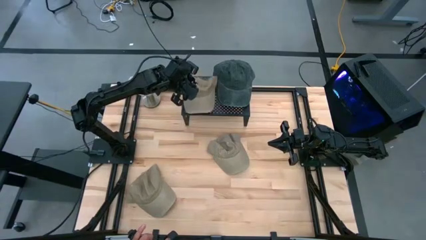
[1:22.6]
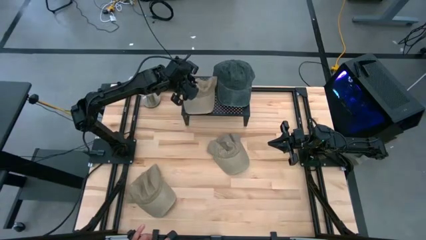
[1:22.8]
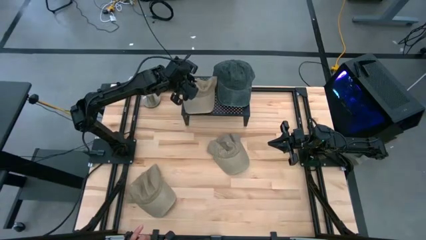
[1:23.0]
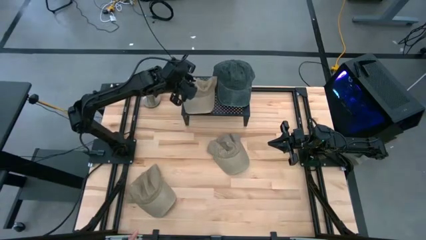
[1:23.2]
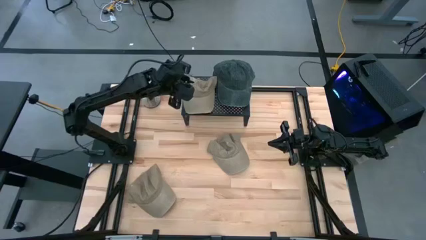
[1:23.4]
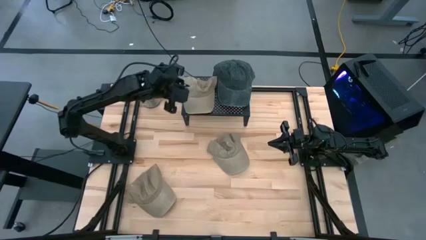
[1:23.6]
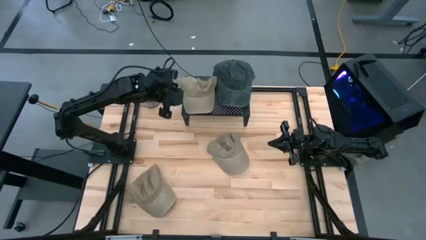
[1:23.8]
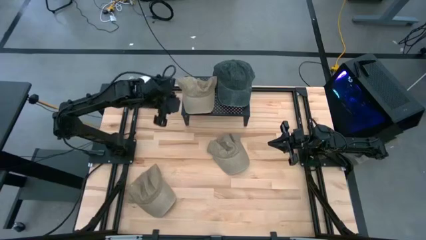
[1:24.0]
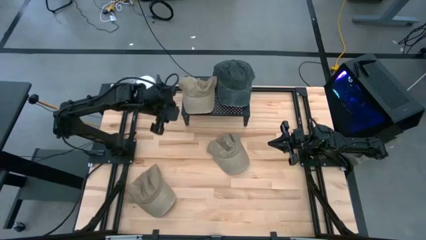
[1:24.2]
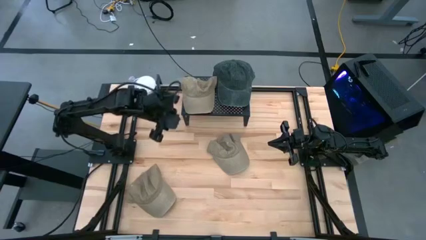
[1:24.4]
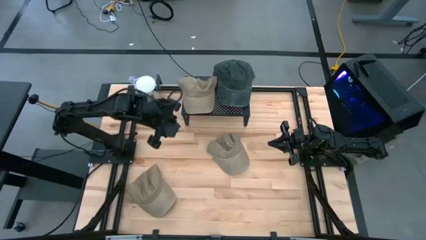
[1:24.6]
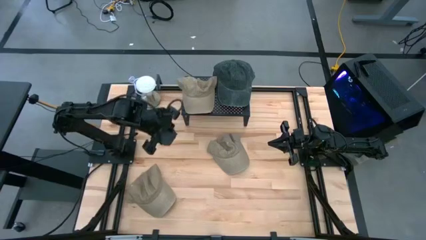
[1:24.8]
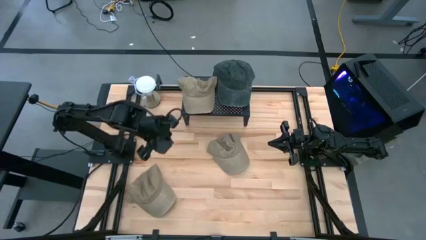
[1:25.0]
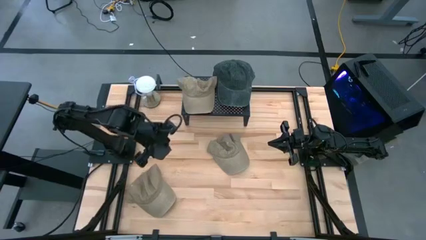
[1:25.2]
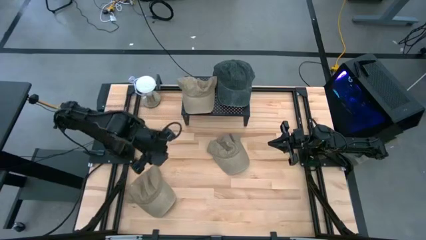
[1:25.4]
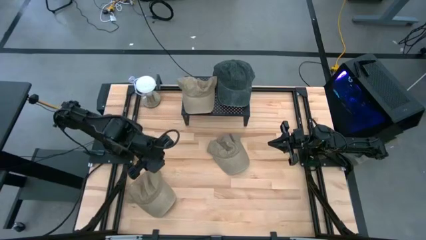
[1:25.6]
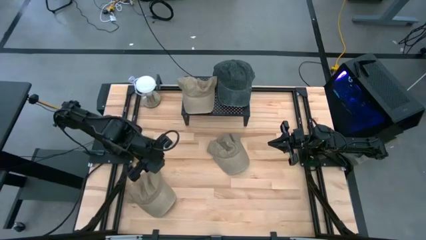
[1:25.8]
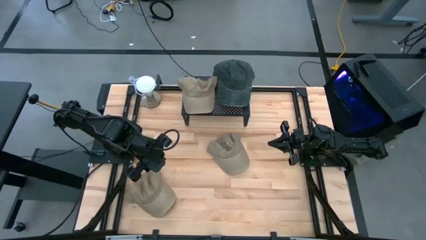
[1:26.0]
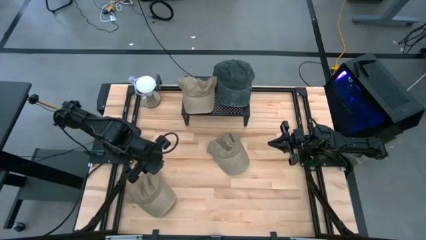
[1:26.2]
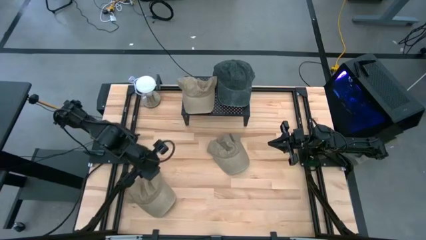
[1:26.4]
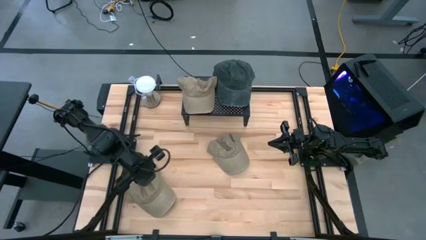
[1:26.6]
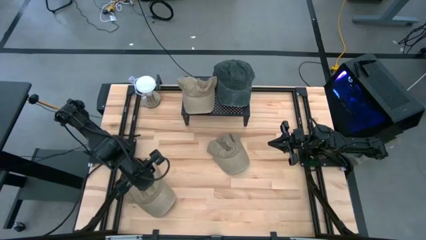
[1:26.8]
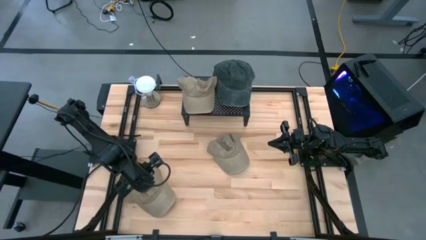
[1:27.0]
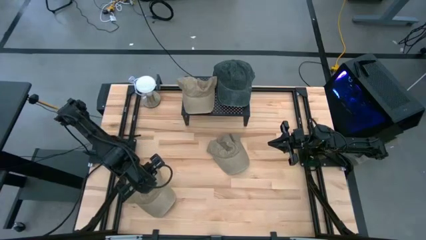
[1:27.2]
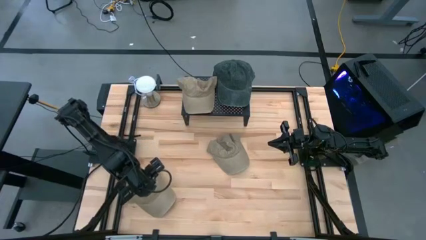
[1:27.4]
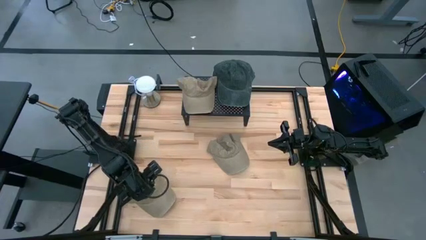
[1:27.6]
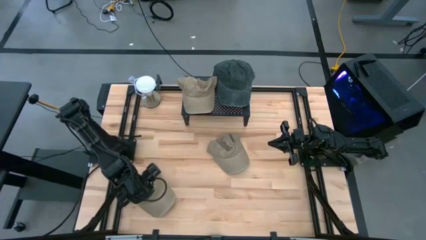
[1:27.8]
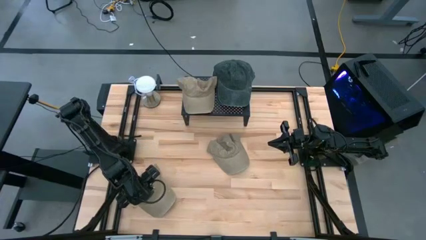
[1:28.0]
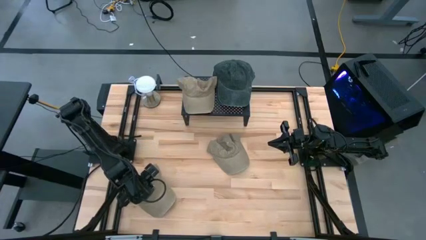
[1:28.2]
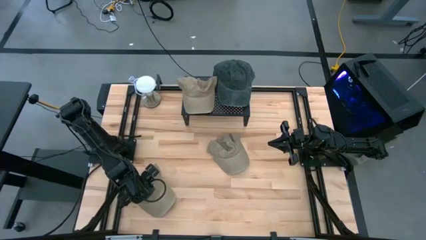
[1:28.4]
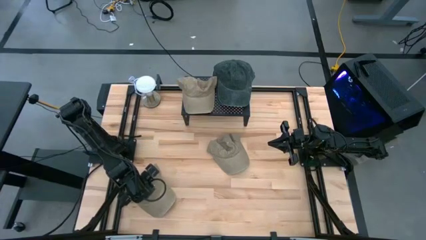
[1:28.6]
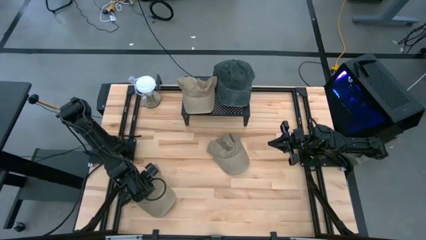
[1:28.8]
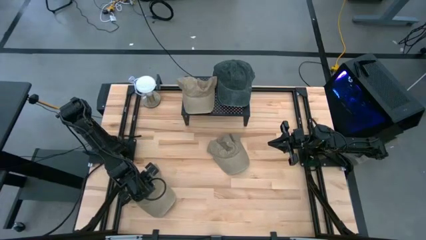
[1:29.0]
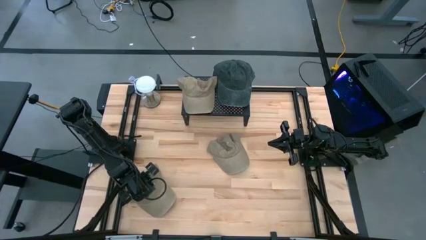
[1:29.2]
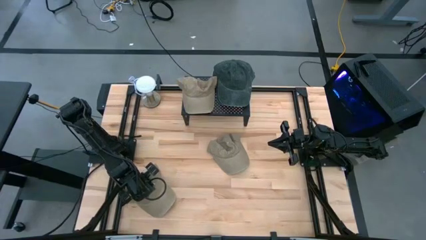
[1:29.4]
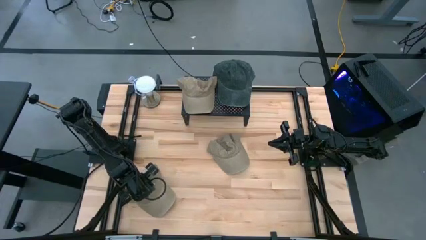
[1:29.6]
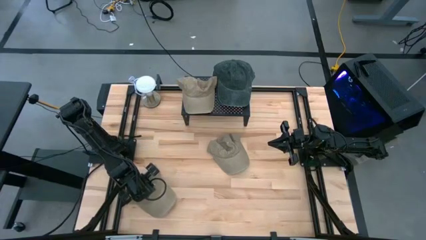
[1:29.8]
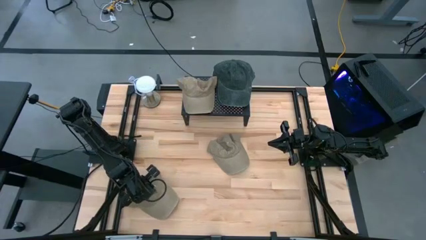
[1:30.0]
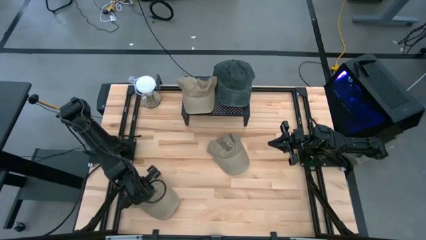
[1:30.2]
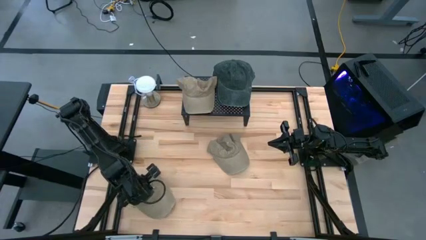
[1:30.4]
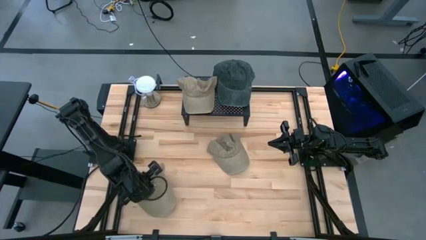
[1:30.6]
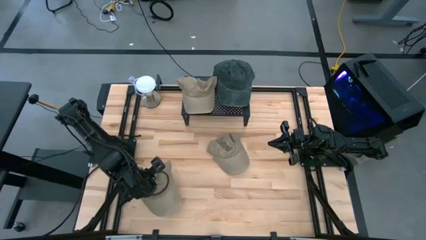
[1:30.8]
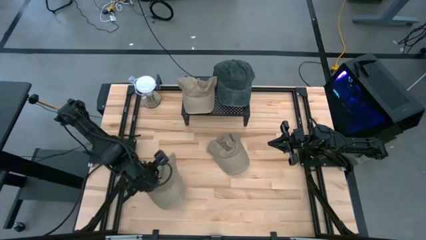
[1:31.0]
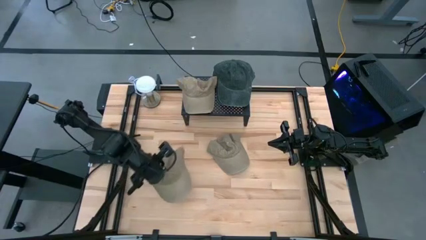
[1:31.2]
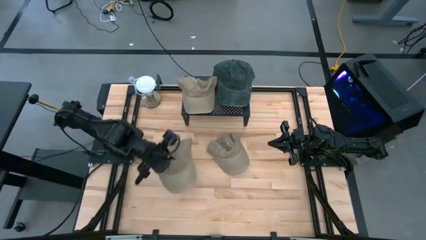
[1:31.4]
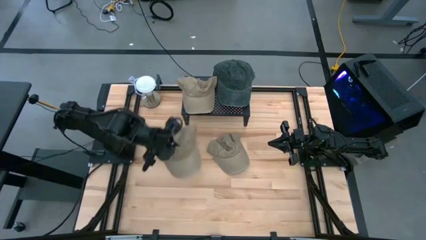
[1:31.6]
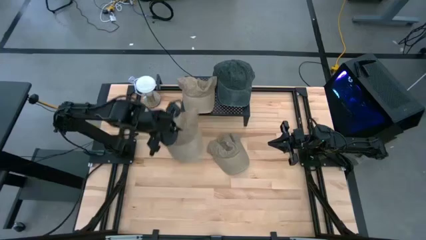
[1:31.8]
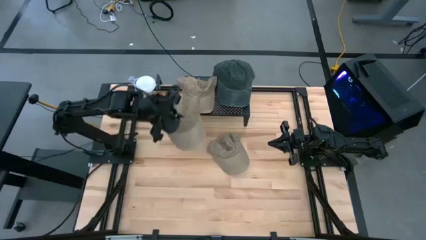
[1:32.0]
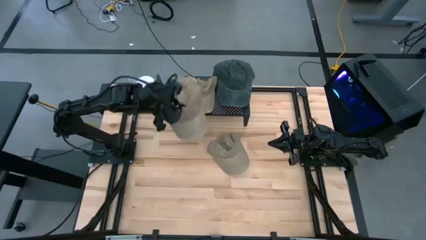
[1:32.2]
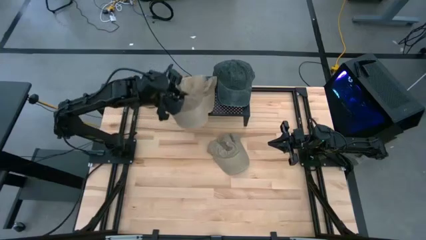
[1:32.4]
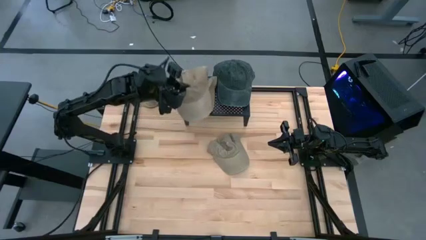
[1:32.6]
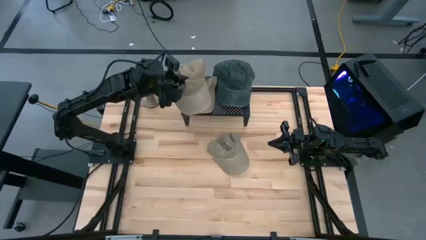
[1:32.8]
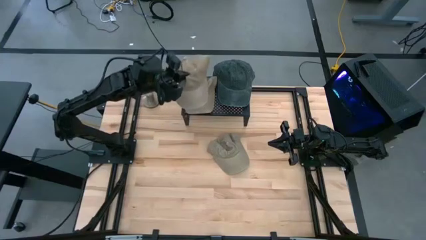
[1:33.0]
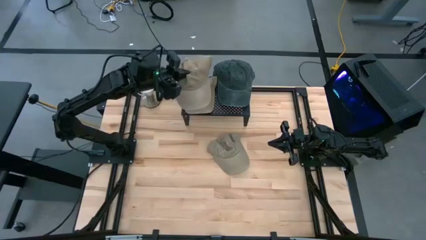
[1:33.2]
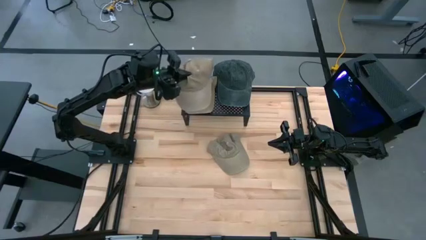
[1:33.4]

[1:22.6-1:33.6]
Task: Pick & Place hat
Stack the left brown cap on the other brown cap on the shelf

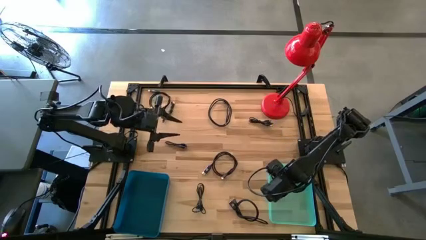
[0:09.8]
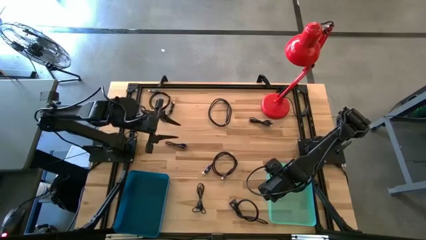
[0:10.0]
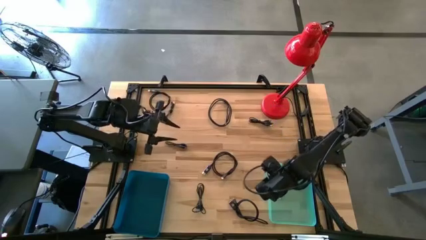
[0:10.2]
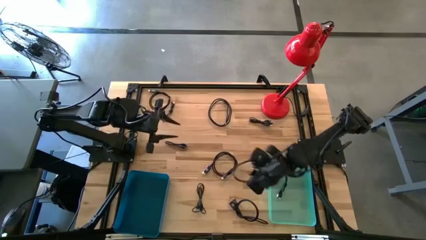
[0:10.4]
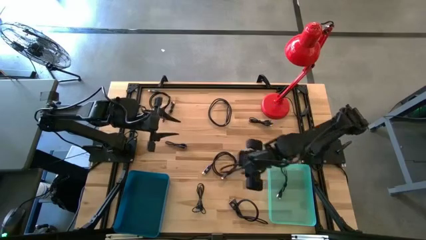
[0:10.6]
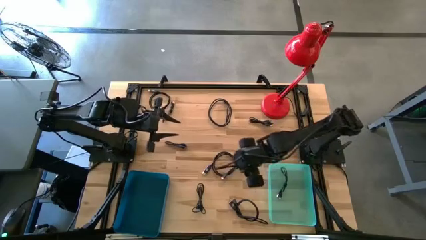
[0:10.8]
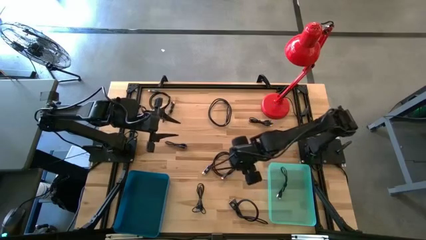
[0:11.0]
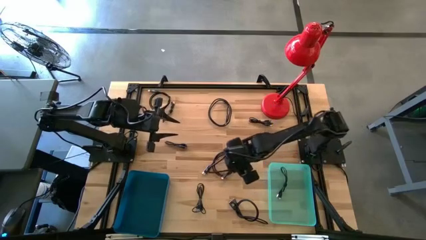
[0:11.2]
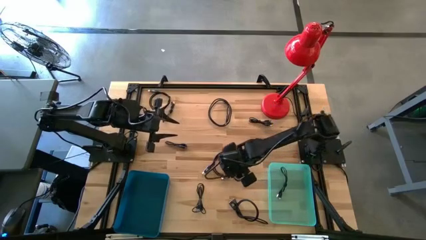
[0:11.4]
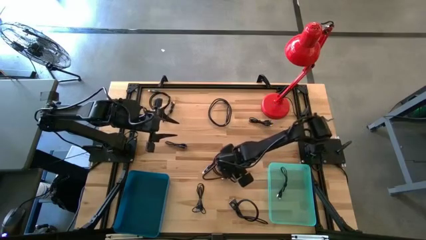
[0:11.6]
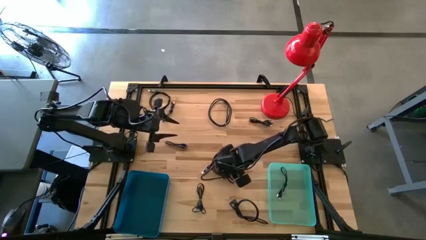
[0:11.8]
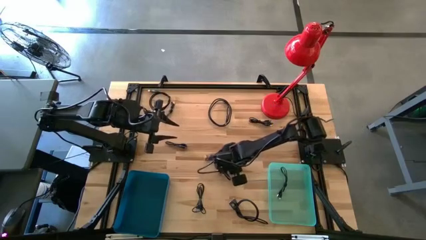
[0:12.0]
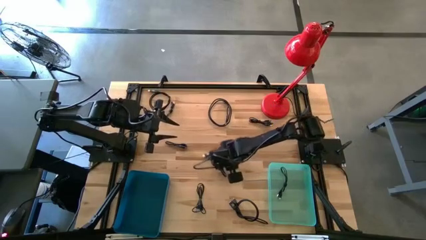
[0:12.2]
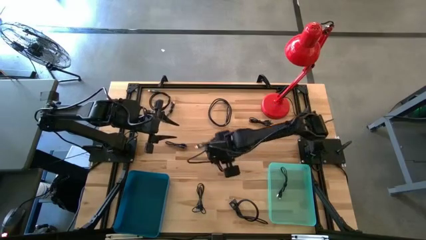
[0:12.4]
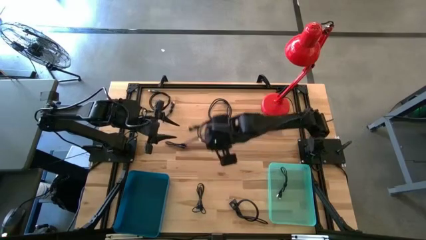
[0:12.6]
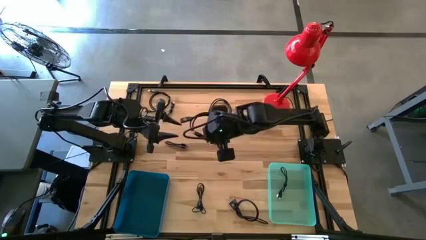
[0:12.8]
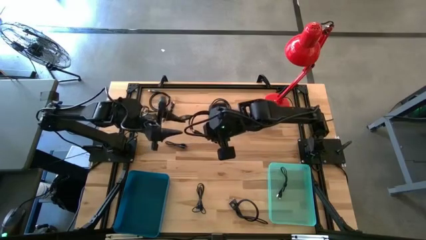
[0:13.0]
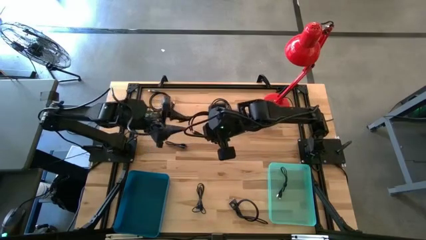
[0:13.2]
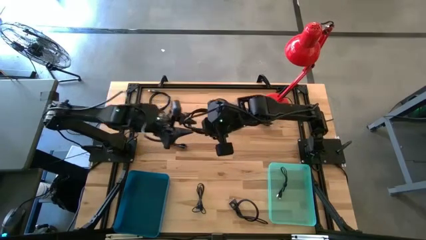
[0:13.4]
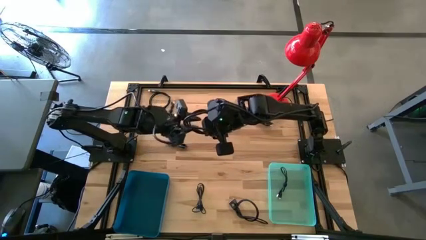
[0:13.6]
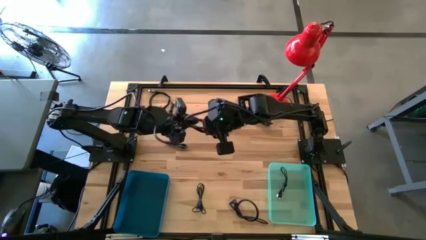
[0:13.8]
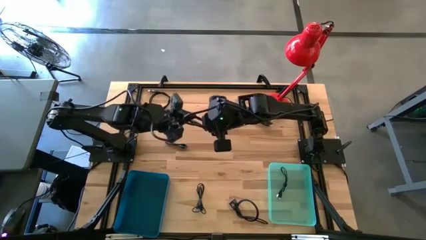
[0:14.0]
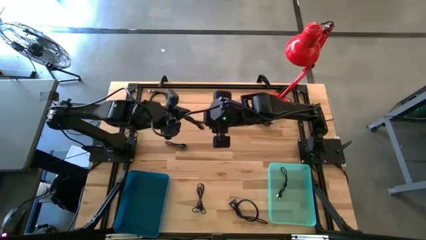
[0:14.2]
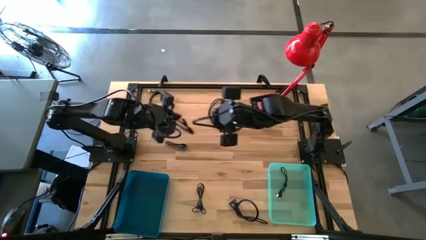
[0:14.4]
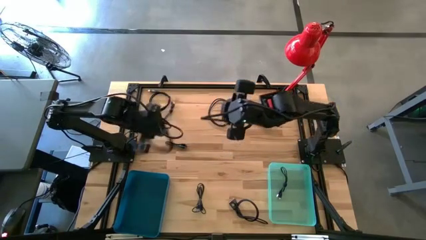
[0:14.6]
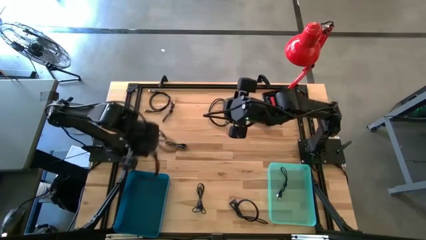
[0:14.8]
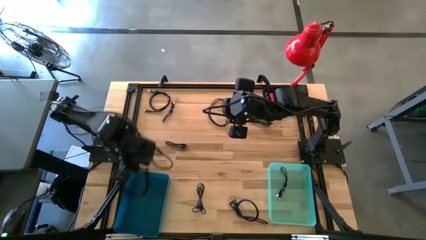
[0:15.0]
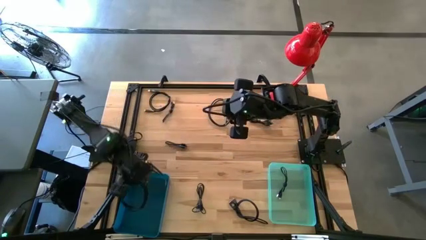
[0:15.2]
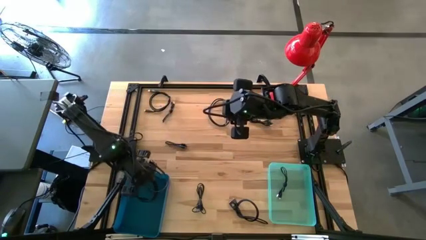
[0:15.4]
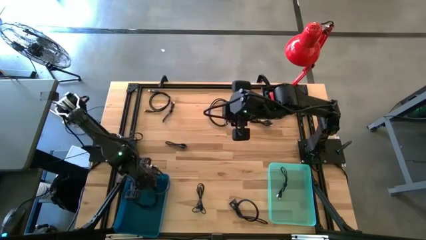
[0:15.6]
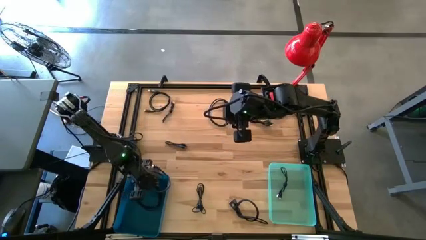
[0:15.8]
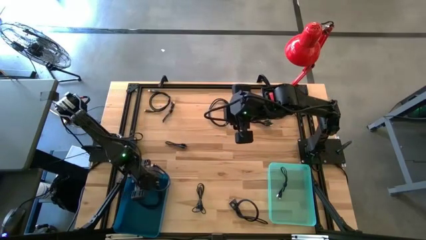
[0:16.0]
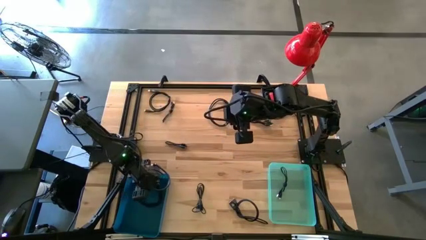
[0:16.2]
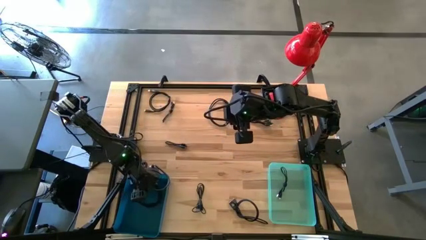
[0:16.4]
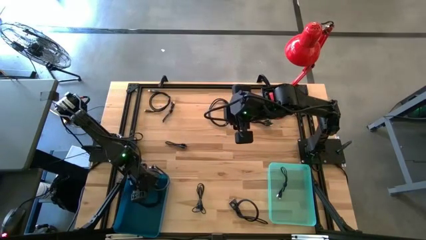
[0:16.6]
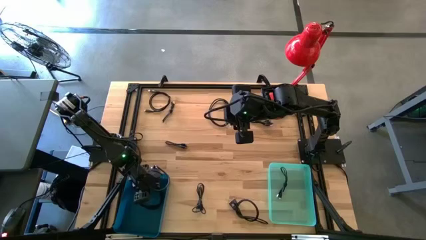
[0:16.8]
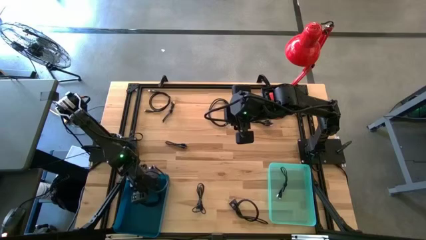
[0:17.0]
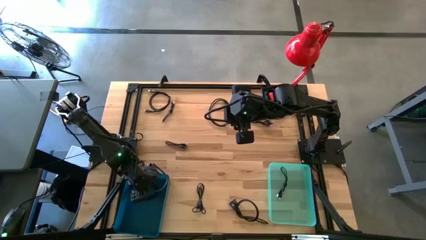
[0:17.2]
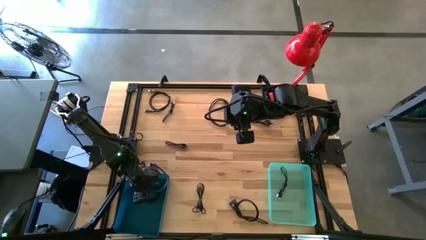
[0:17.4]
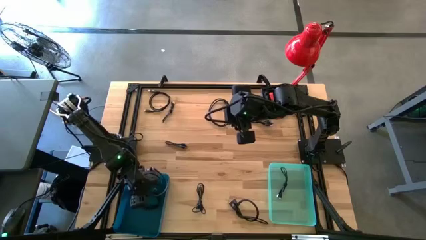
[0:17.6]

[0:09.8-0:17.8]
Task: Pick & Place USB Port
Put the black USB cable into the dark blue bin
